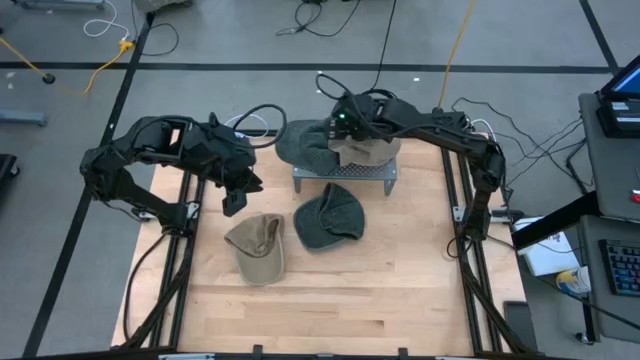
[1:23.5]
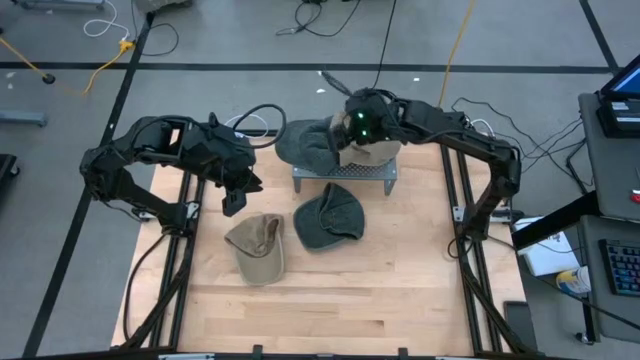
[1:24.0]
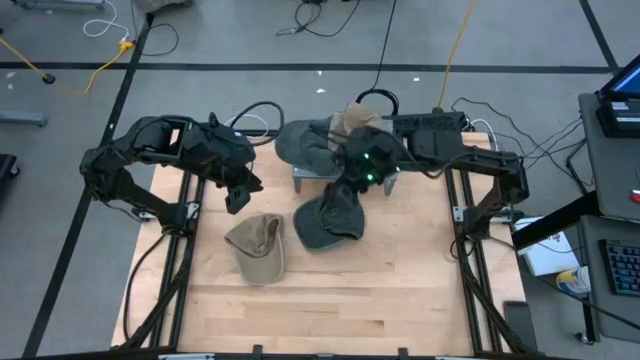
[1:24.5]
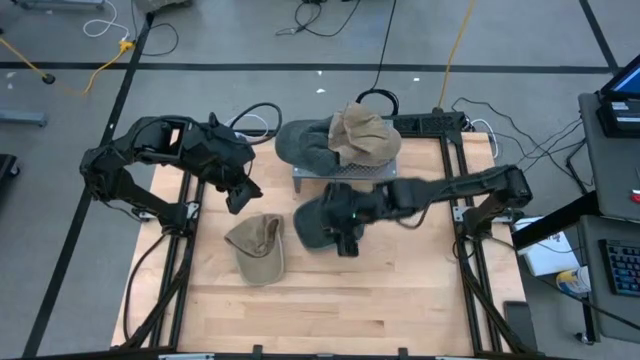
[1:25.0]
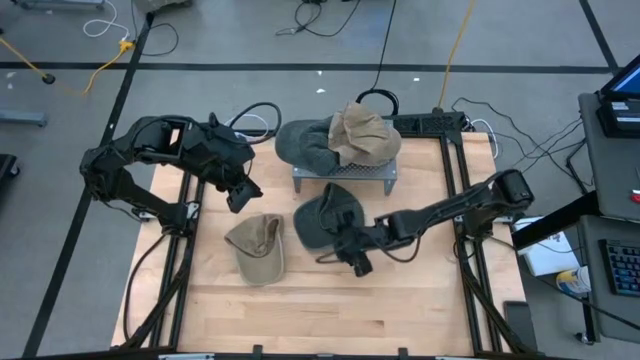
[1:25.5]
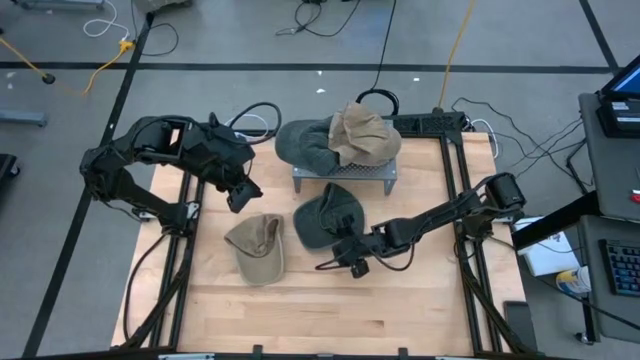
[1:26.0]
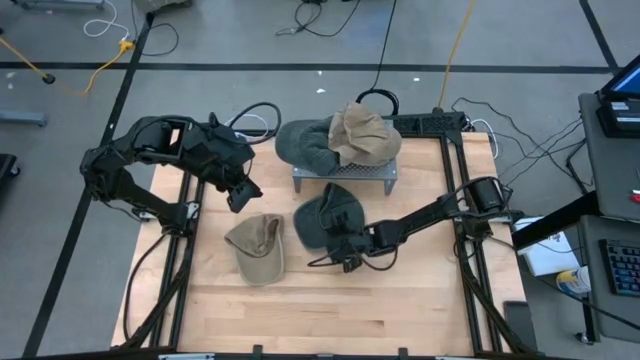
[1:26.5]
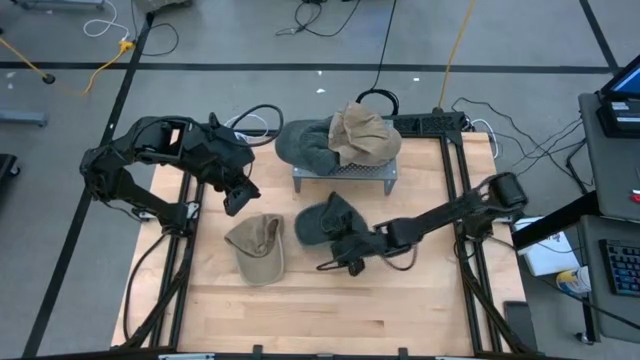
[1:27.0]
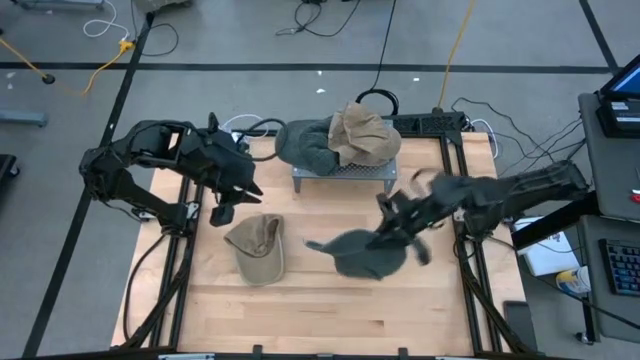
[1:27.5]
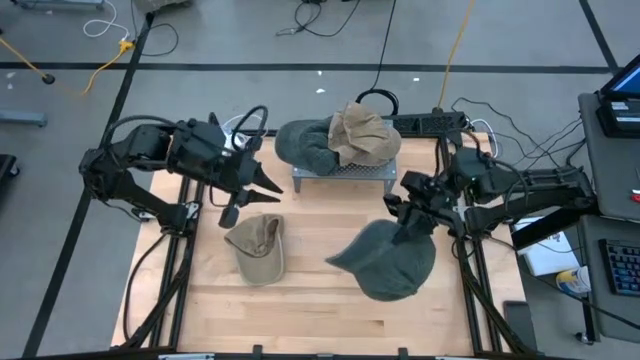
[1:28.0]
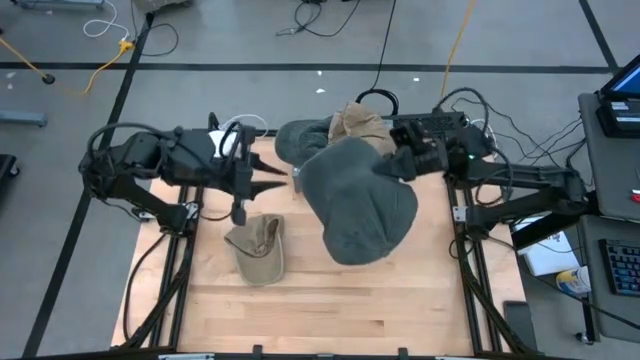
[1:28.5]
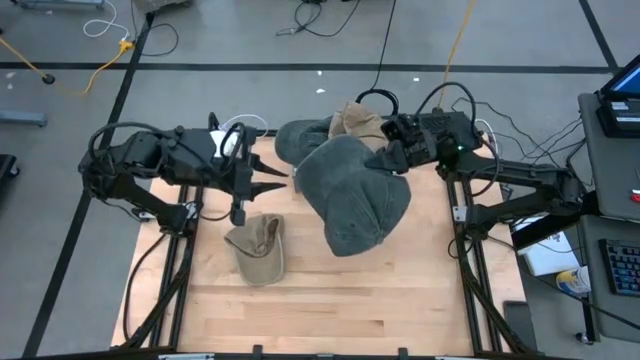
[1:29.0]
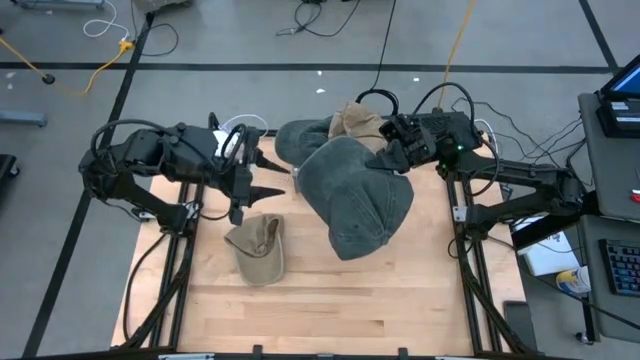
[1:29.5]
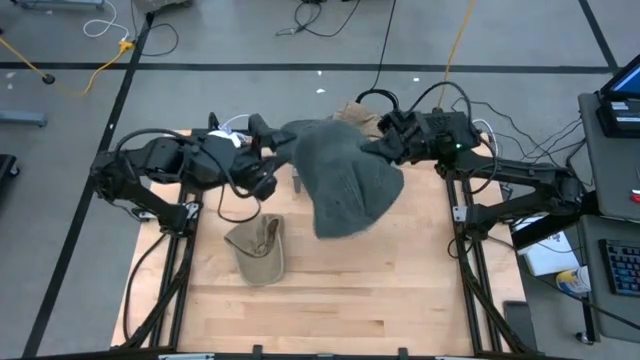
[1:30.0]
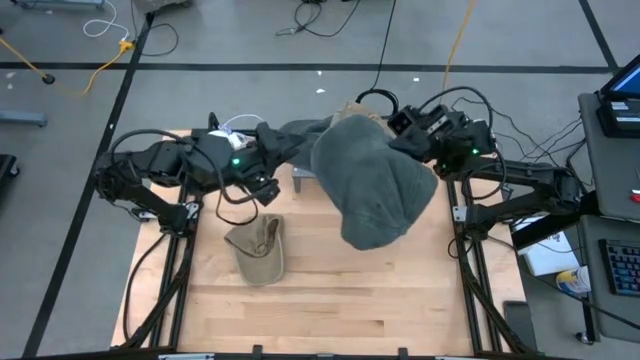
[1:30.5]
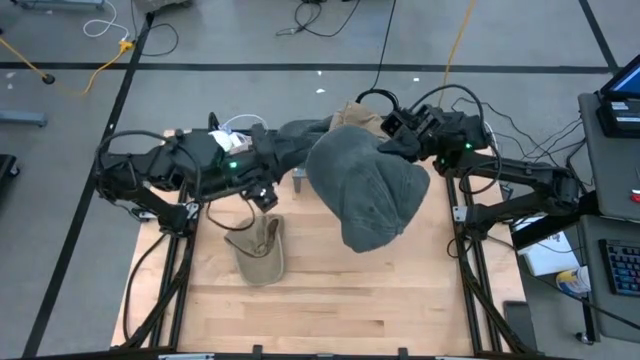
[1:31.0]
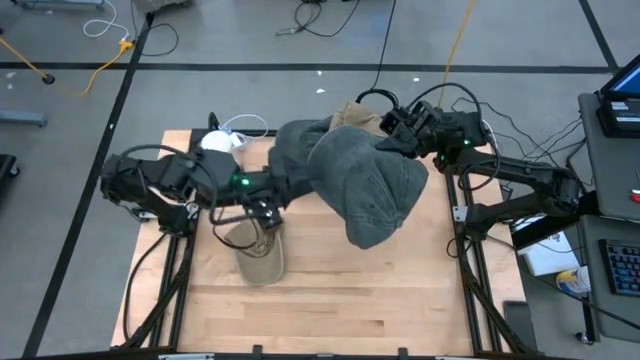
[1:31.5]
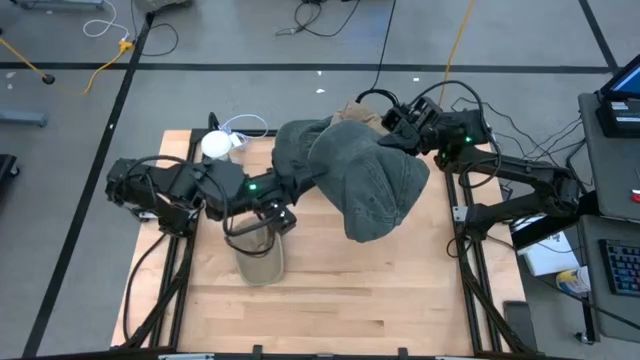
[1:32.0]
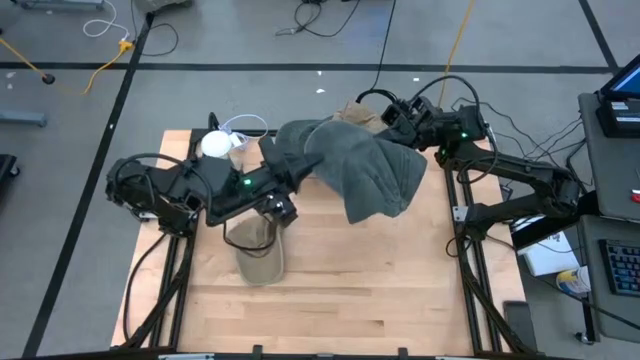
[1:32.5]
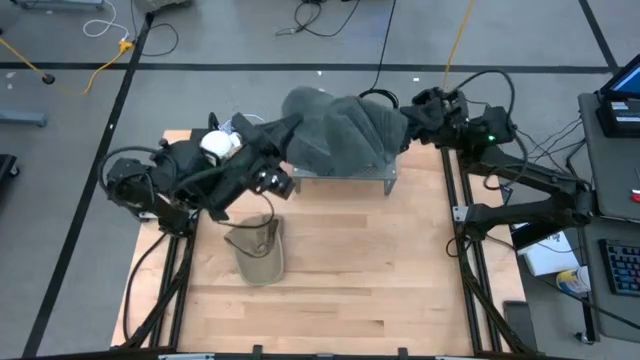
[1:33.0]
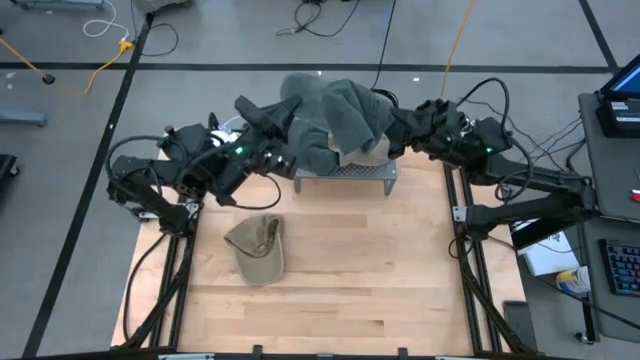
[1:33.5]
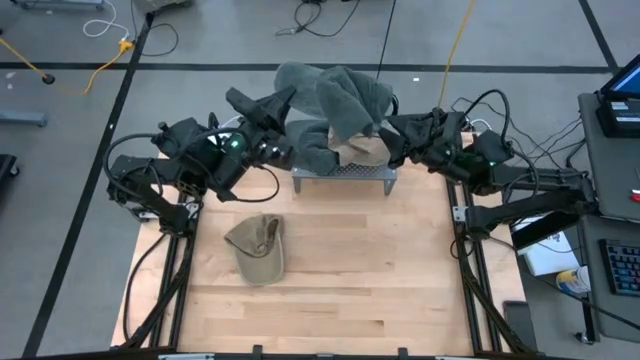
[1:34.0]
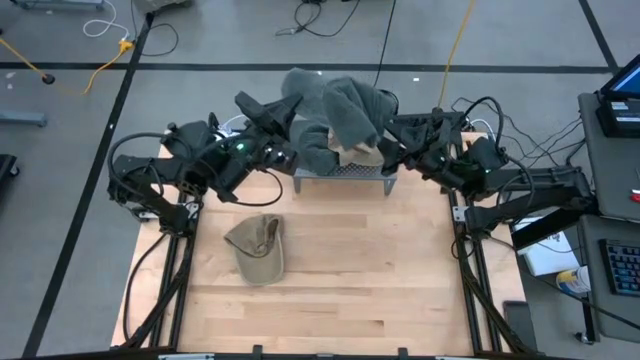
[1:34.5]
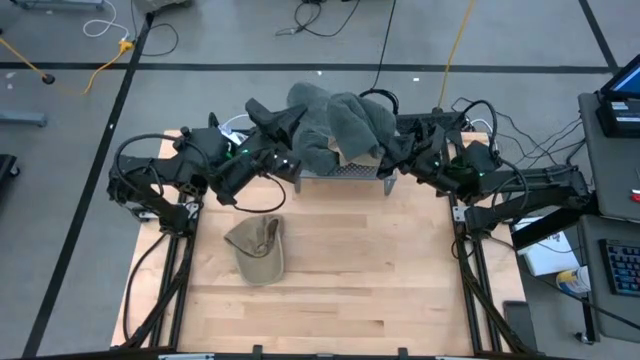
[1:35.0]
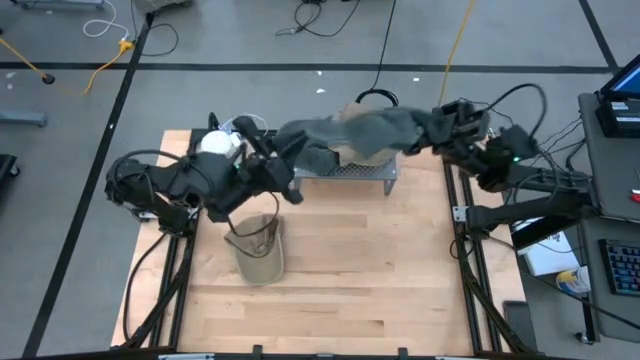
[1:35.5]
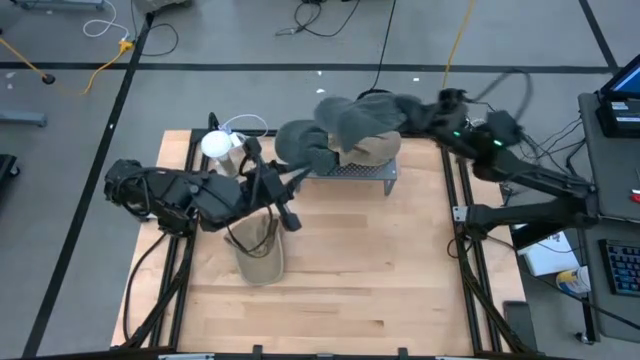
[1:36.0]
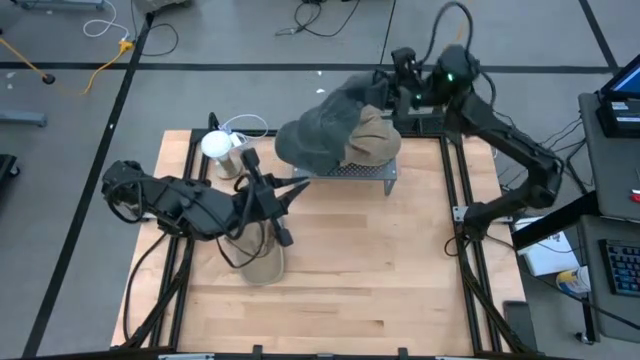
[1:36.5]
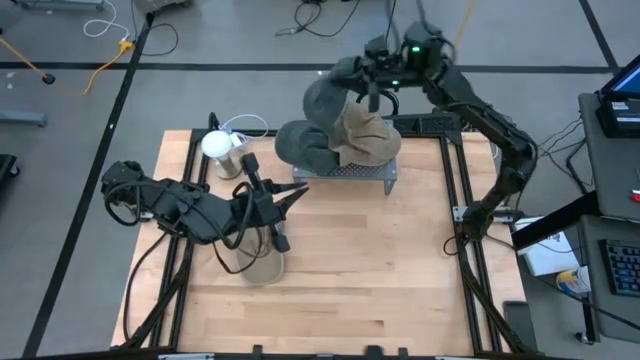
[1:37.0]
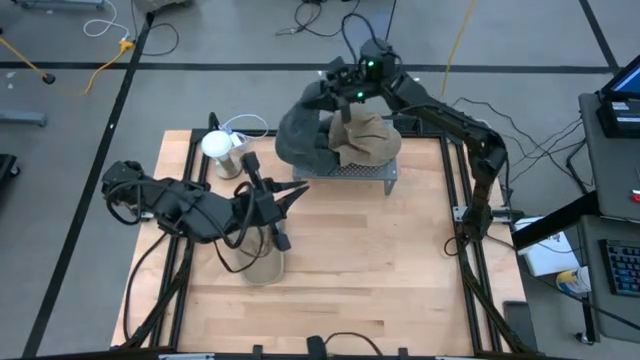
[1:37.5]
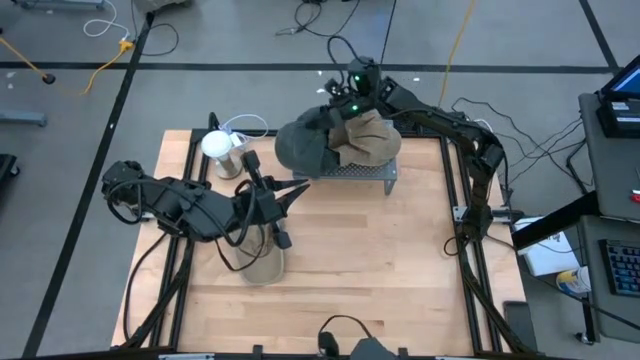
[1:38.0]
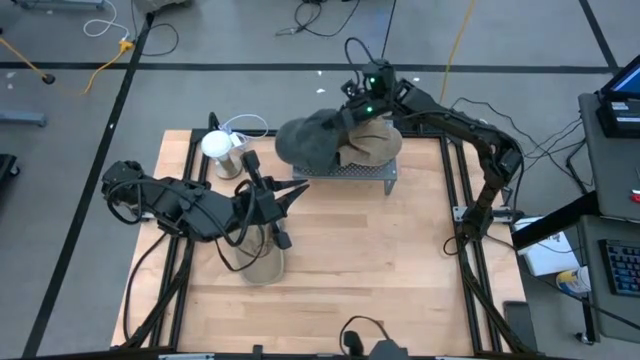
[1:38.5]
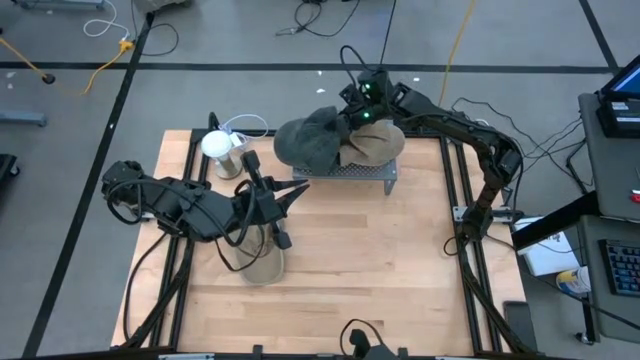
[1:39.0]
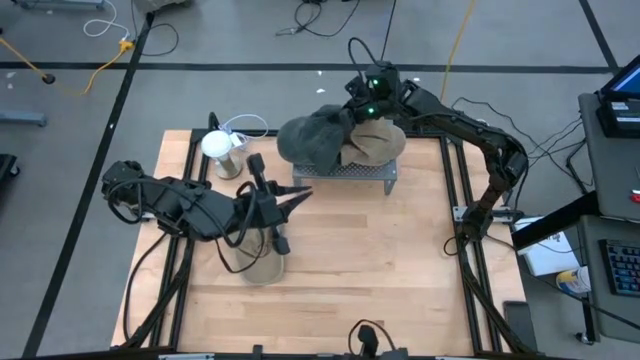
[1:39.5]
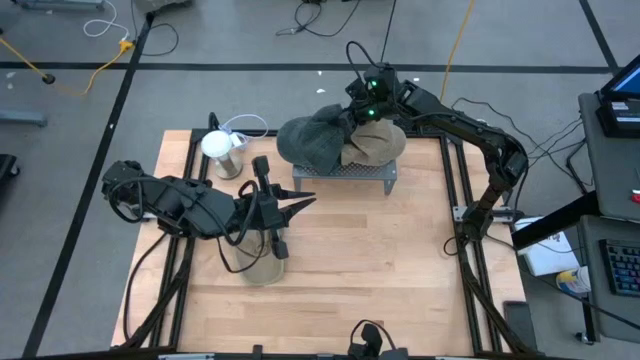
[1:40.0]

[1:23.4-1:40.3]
Task: Pick & Place hat
Stack the green cap on top of the green cap on the shelf
